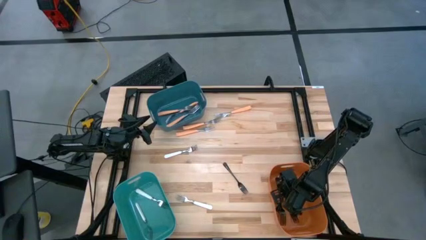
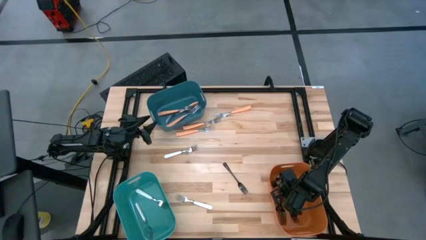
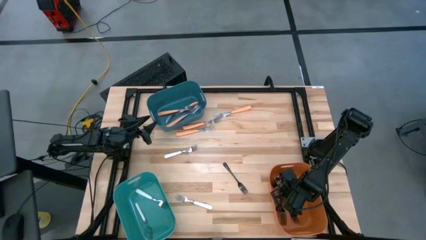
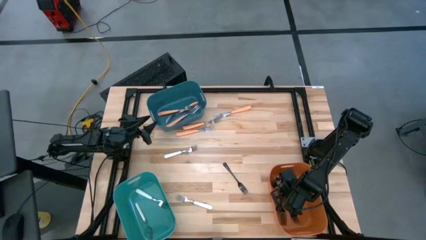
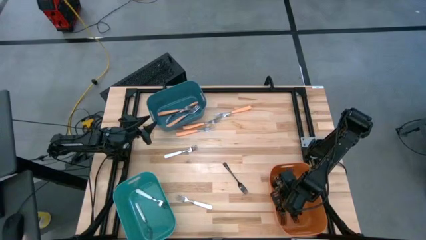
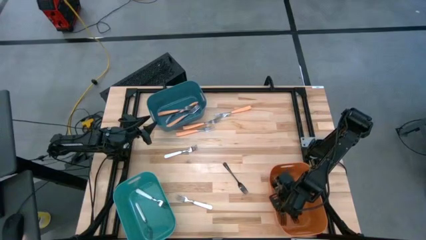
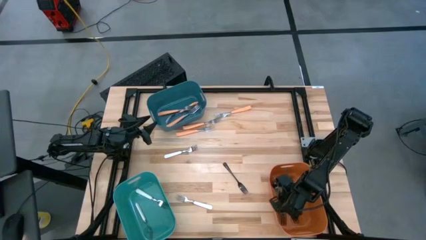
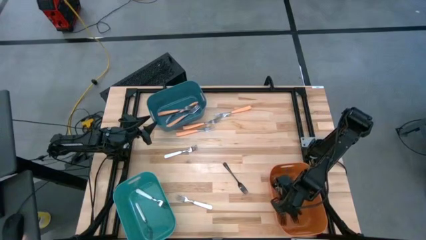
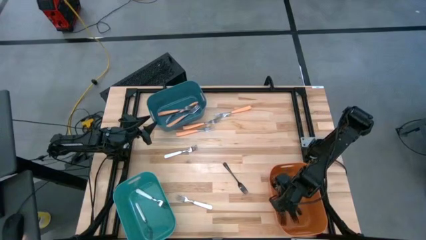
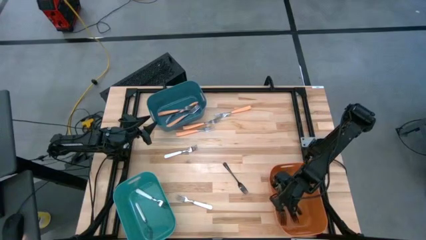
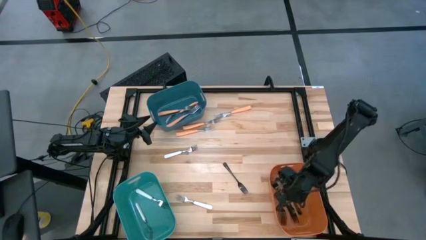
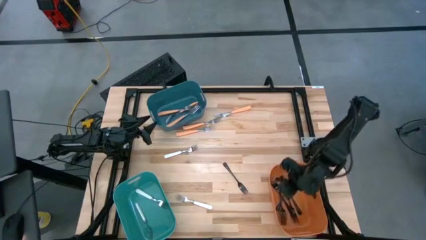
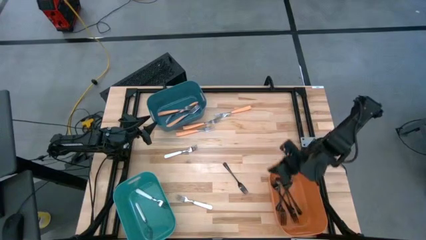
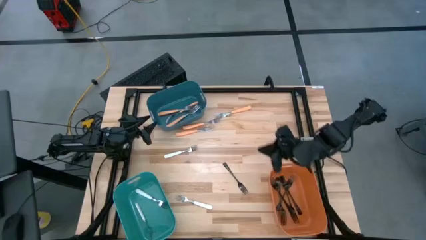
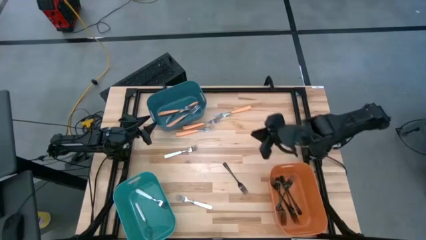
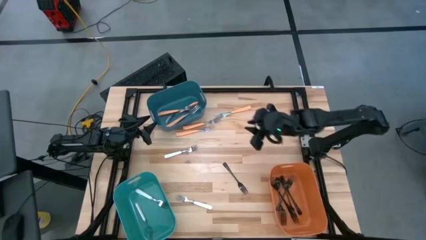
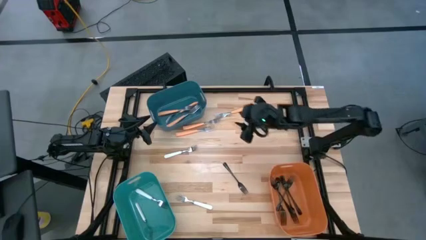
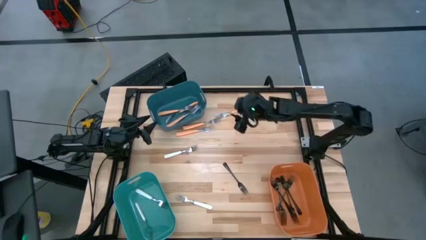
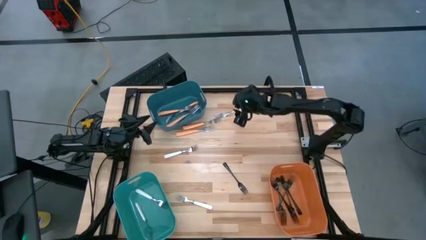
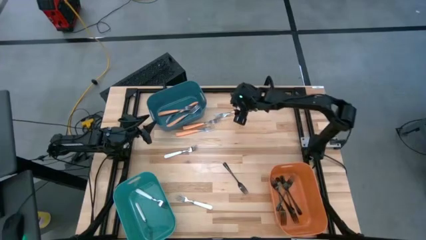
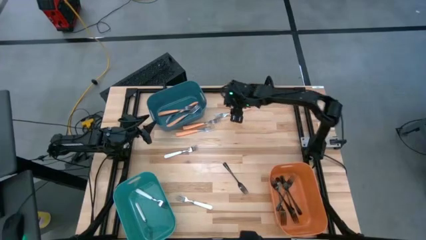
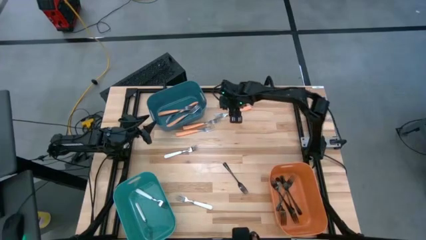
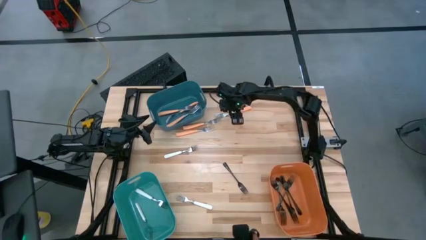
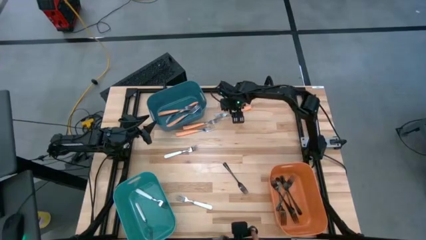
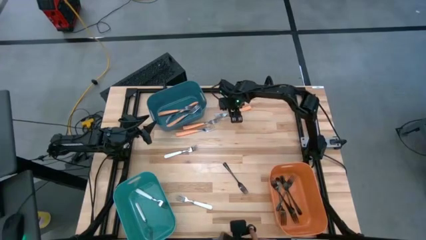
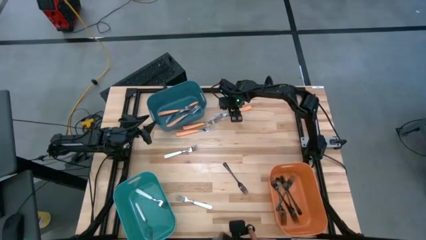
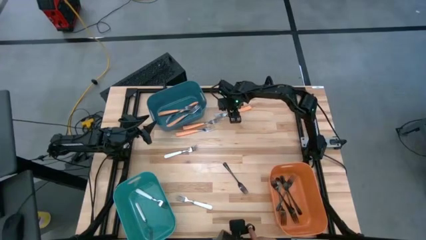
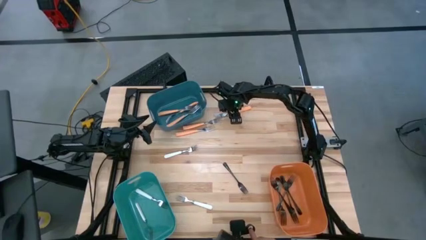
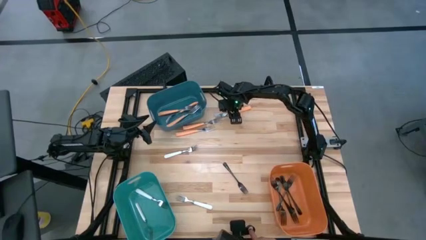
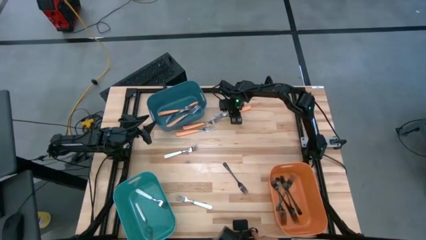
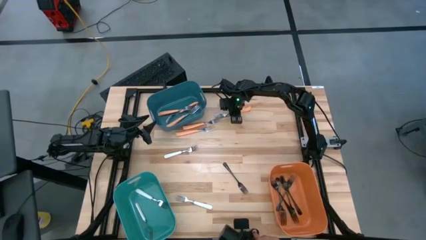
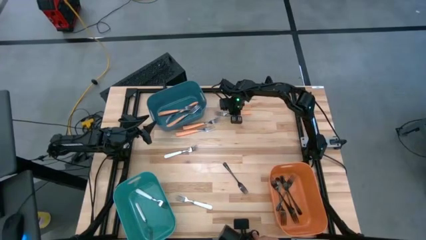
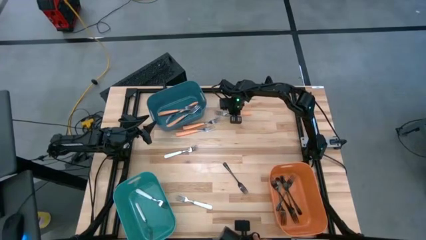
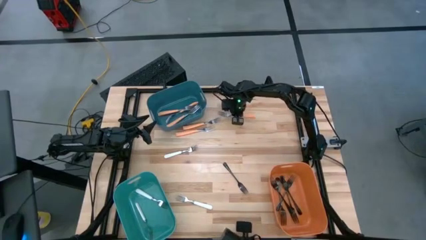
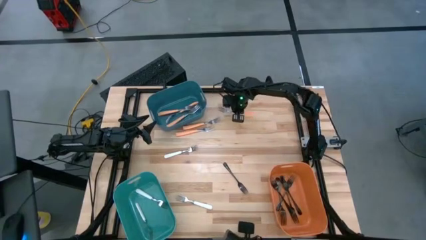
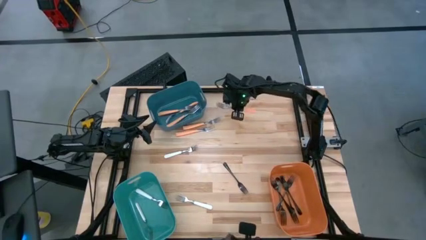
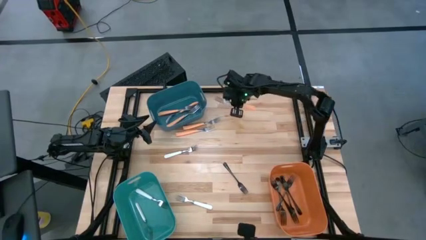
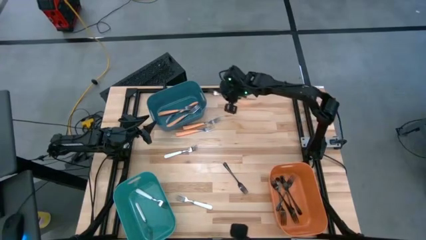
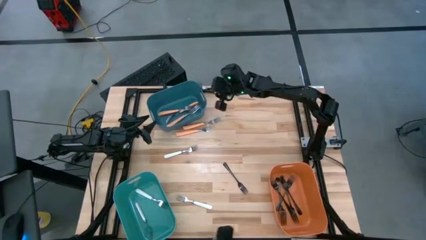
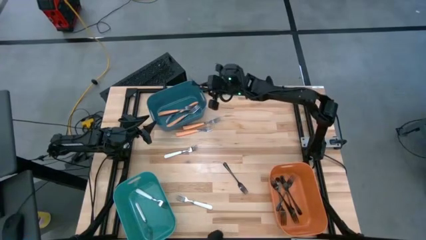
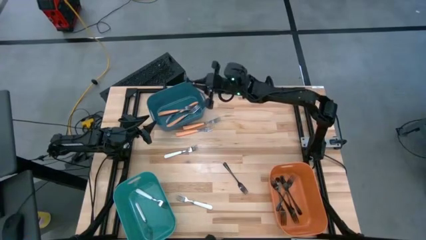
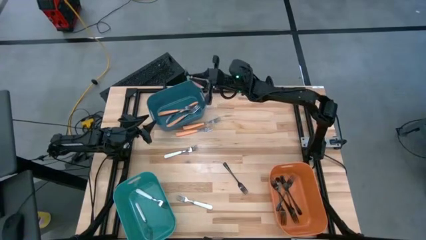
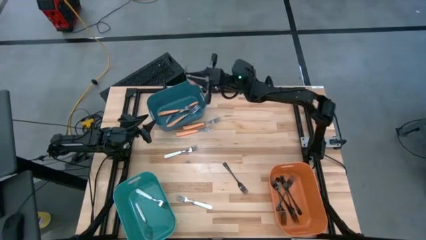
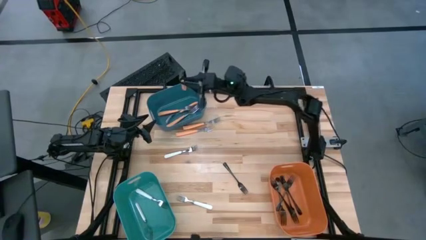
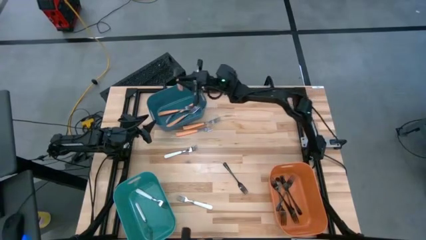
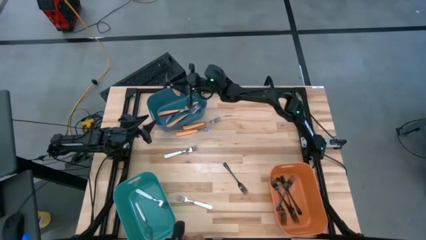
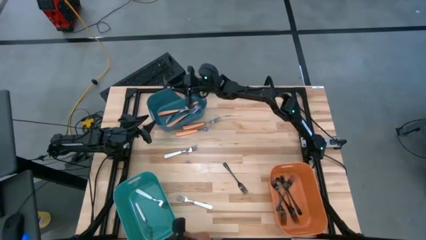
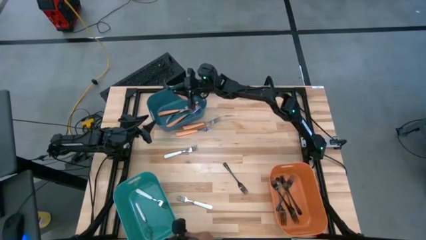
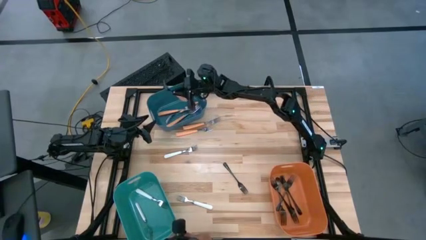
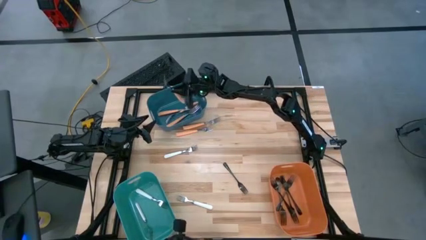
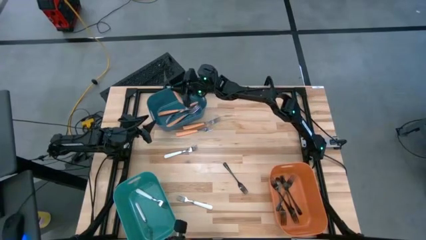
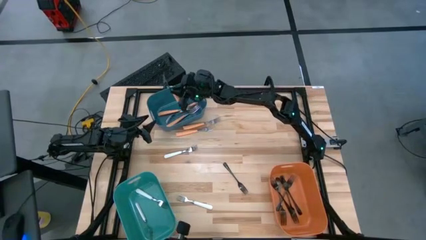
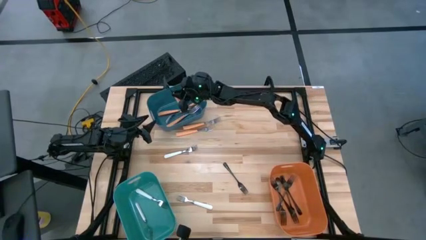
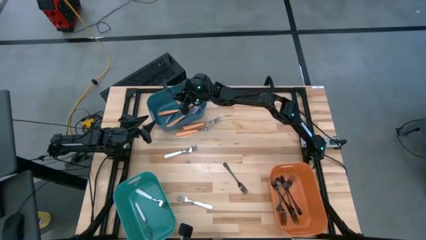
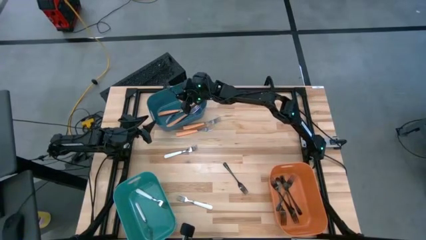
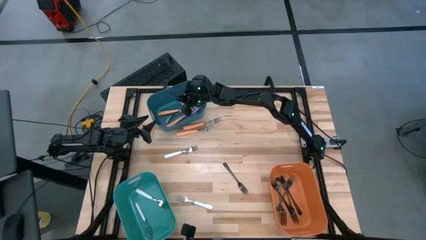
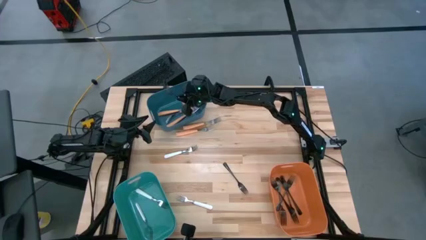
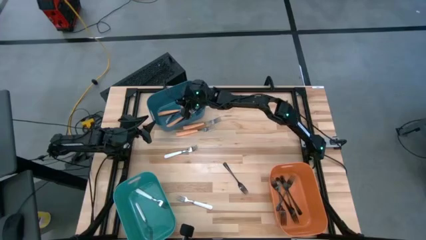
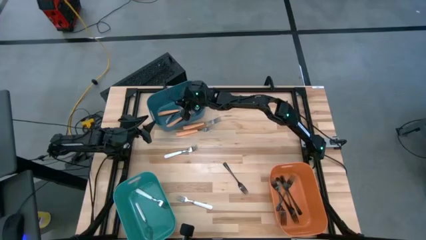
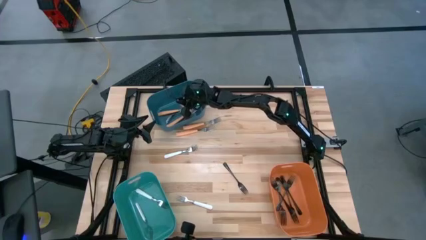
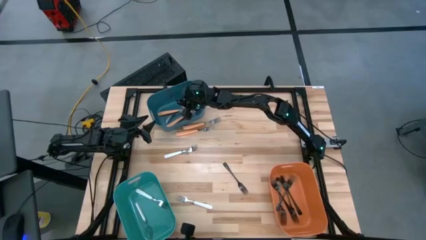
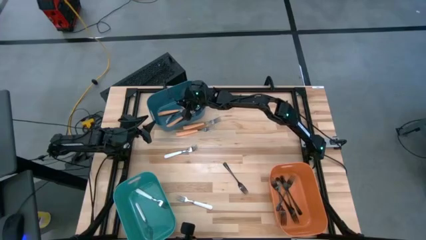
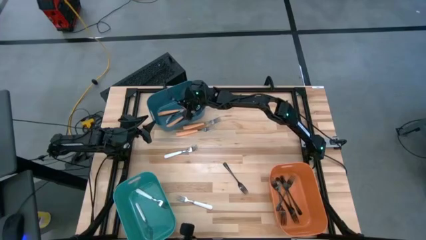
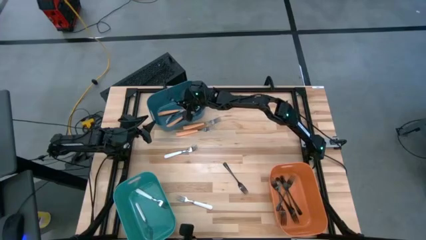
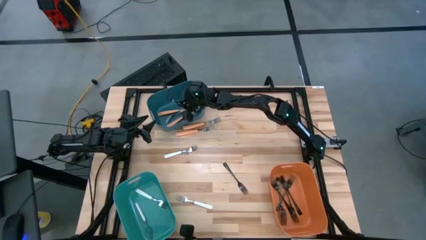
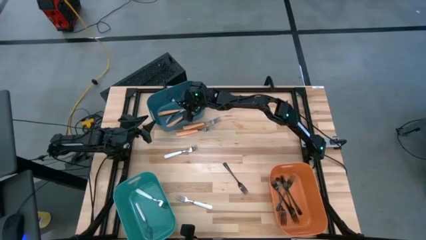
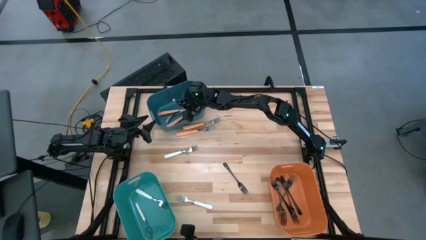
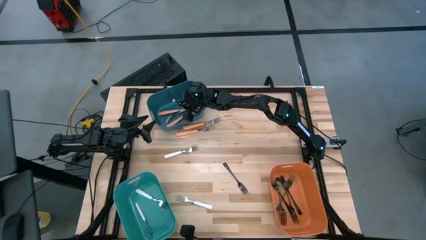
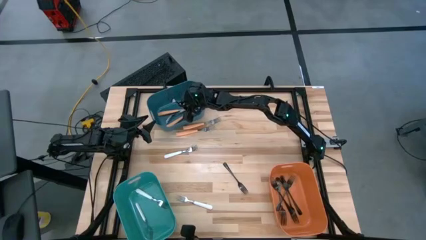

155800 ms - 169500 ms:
Task: Sort silverware by color (type)
Put the orange fork into the blue bin
